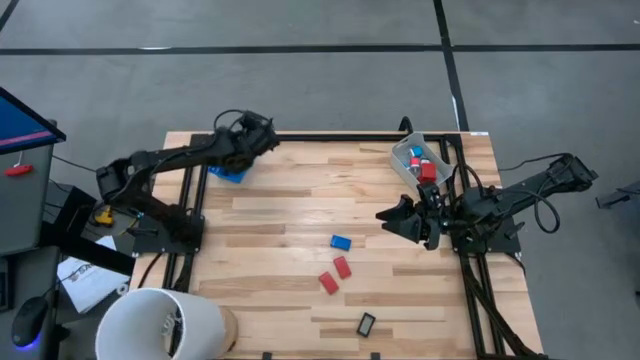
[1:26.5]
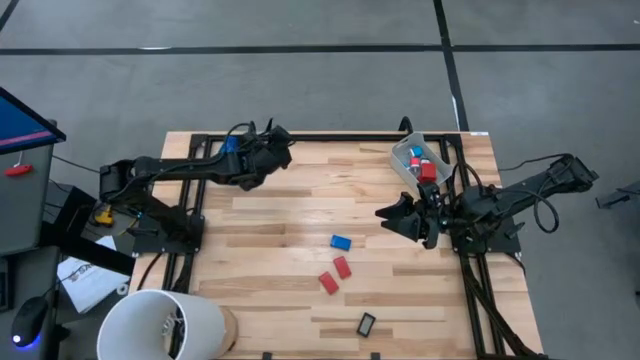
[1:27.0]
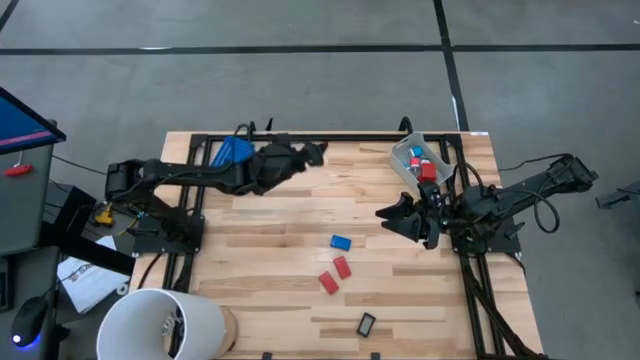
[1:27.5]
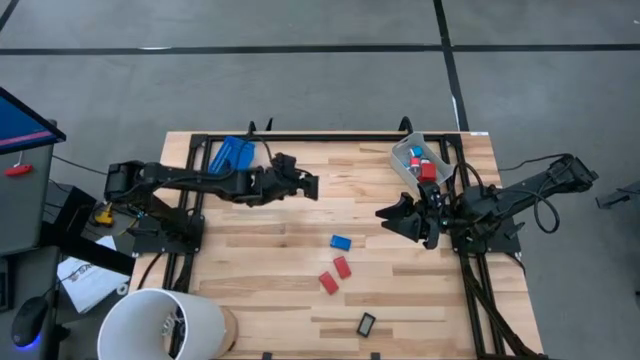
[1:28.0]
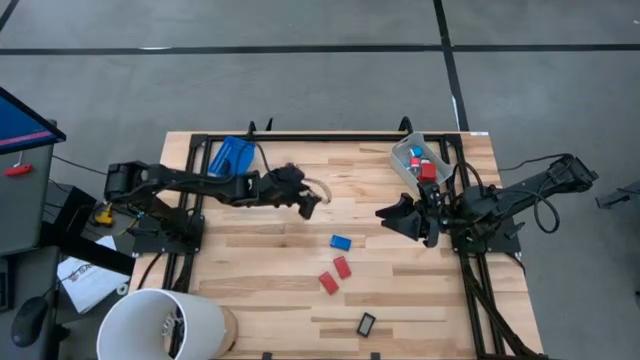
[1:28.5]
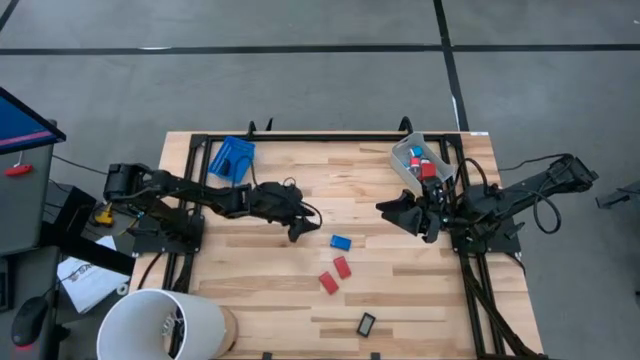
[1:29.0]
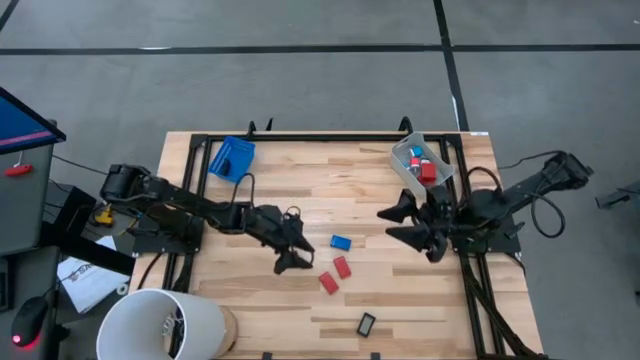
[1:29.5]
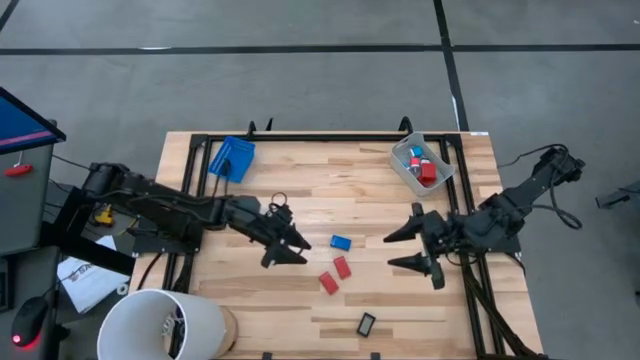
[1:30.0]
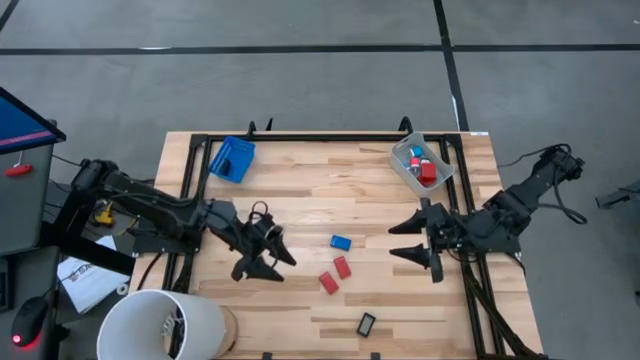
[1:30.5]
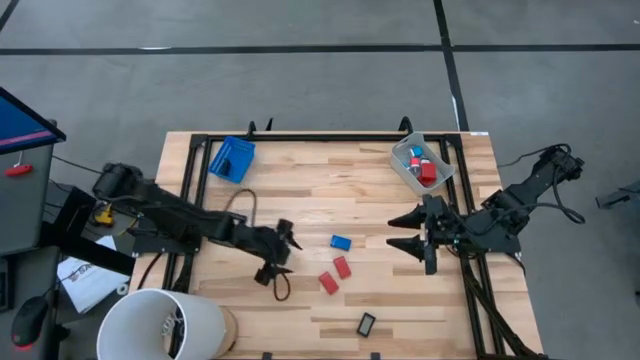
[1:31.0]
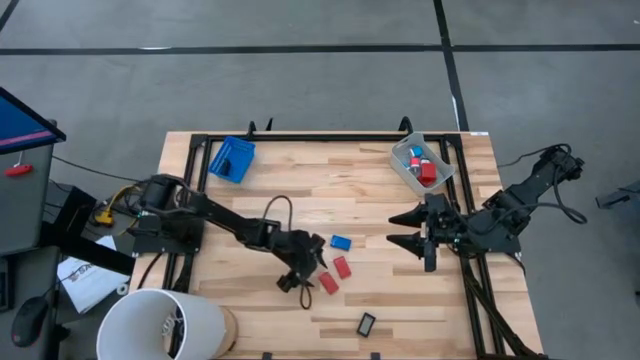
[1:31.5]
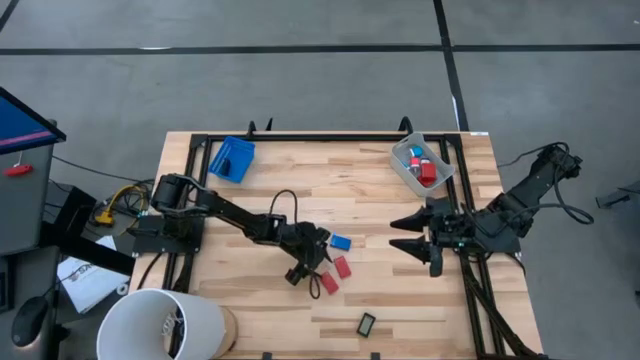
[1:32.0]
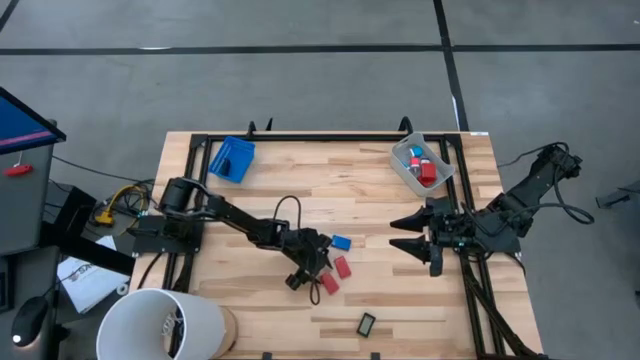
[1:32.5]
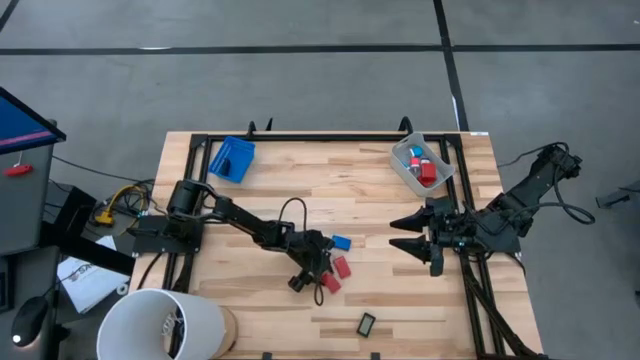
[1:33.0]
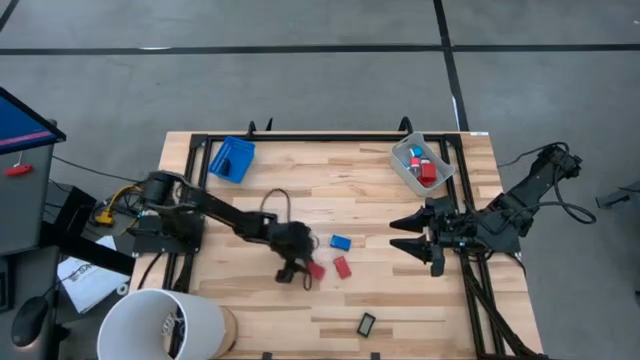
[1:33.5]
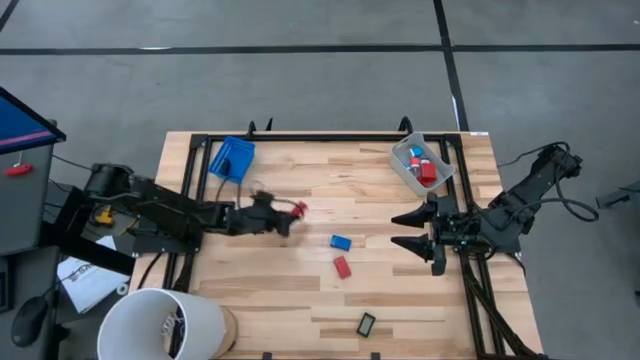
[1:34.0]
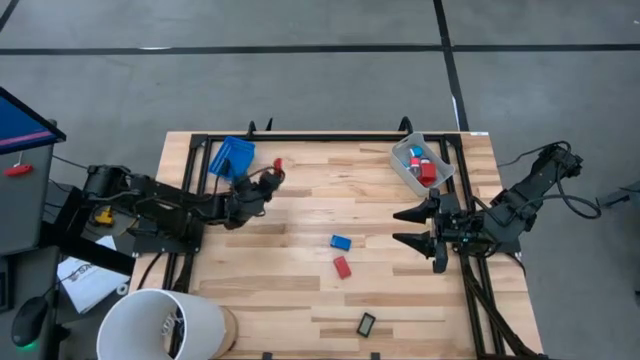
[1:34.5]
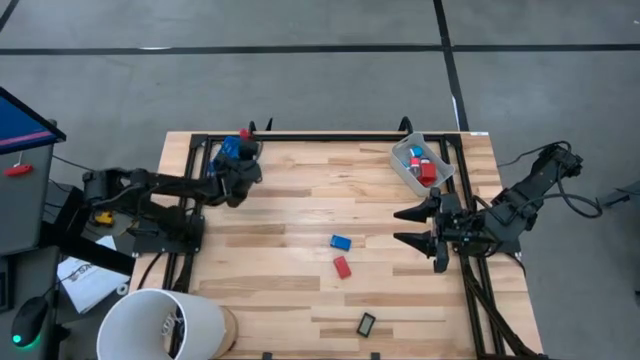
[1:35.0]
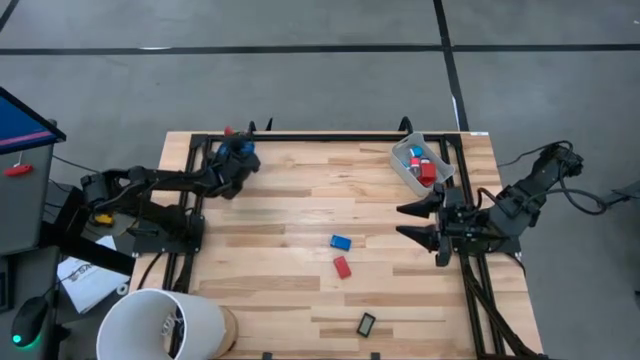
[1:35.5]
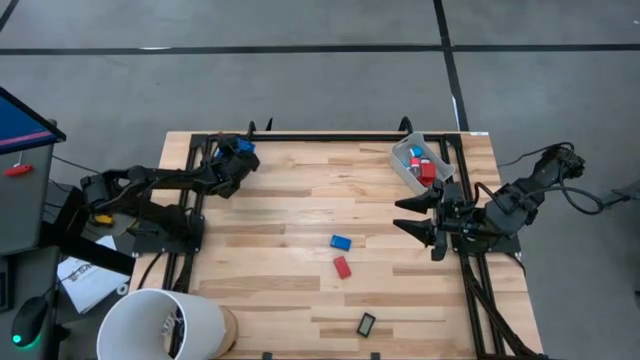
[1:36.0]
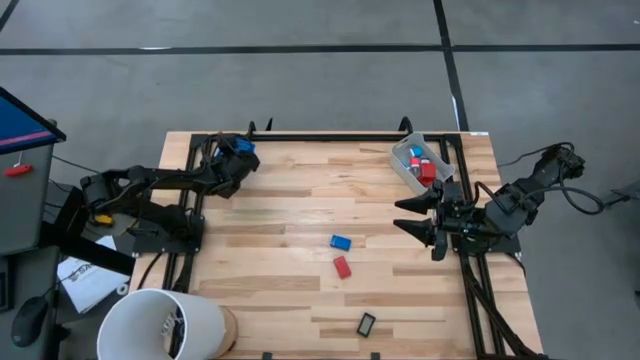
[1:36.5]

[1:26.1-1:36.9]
Task: Pick & Place Office items
Put the left red clock into the blue bin

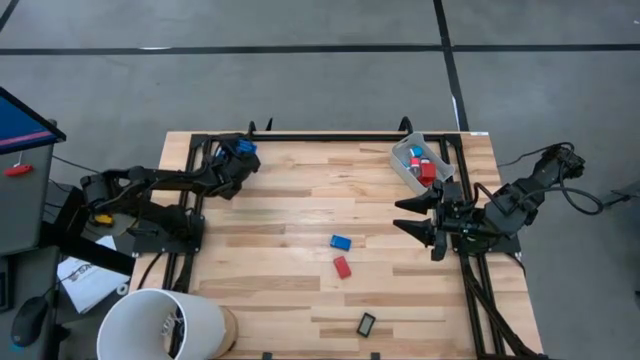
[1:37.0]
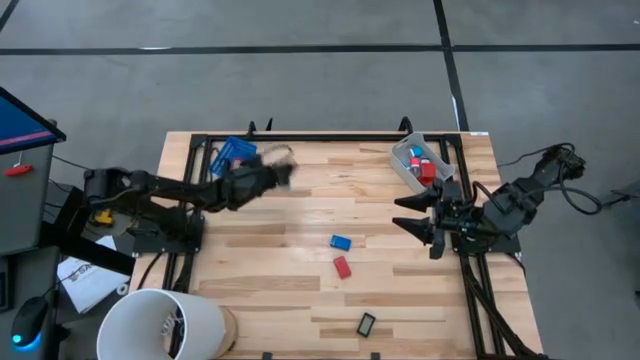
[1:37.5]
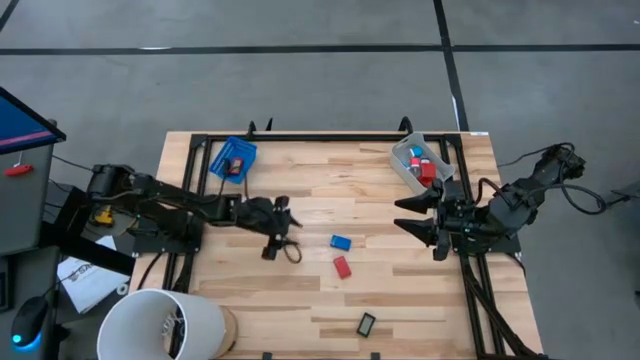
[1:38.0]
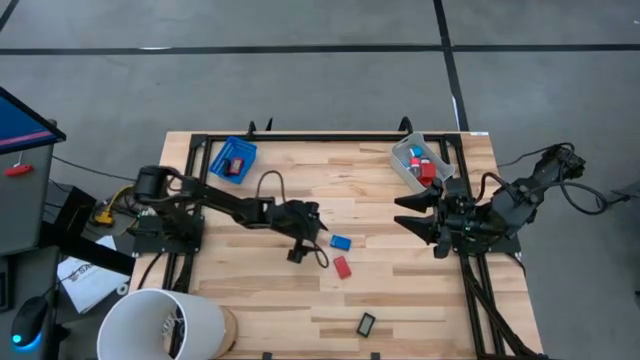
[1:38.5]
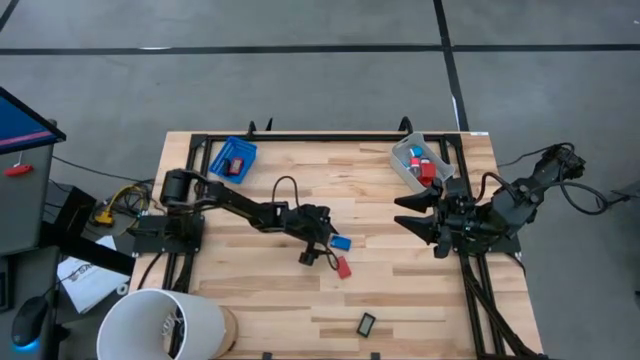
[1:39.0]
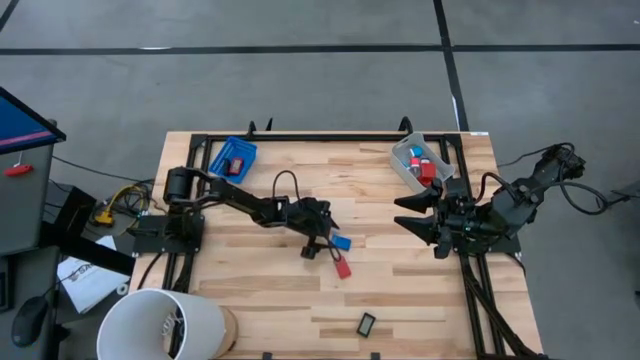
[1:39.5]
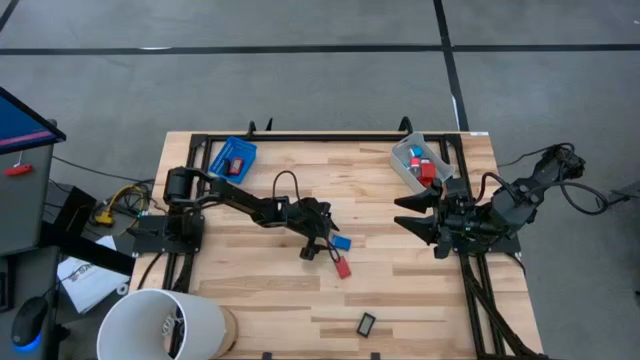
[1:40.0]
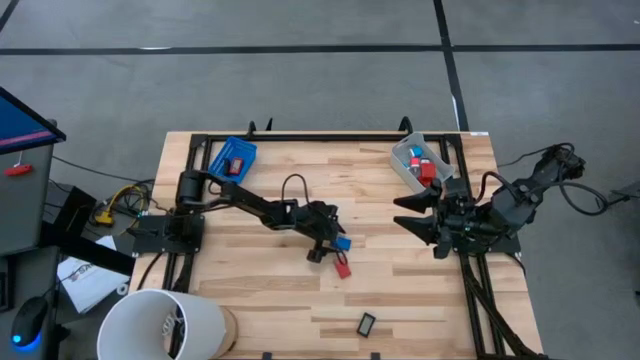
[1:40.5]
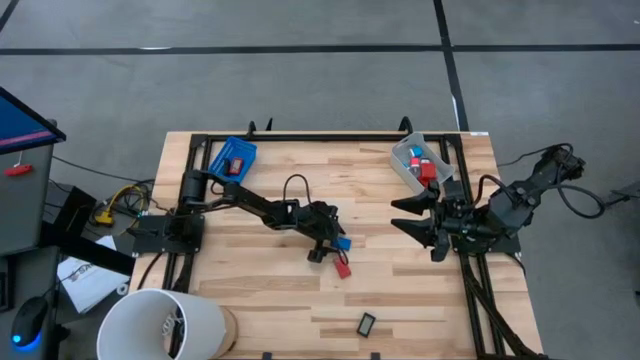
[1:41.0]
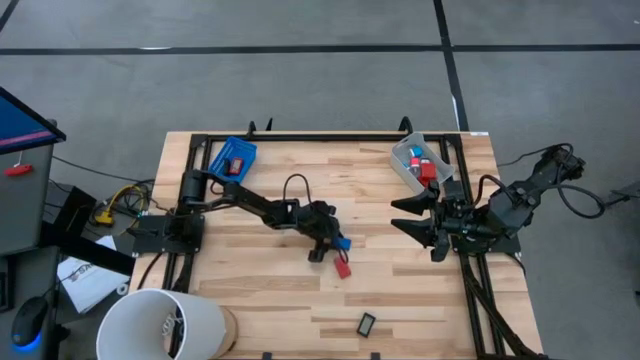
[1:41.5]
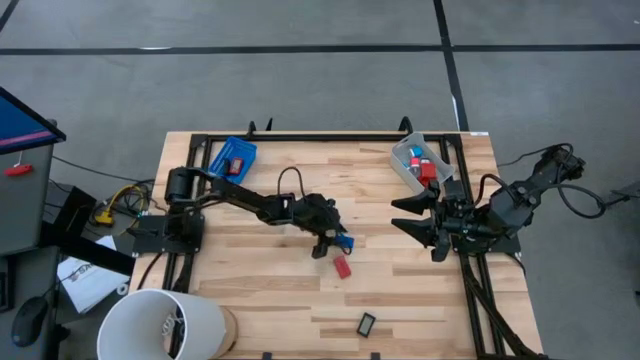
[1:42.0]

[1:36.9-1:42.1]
Put the blue clock into the blue bin

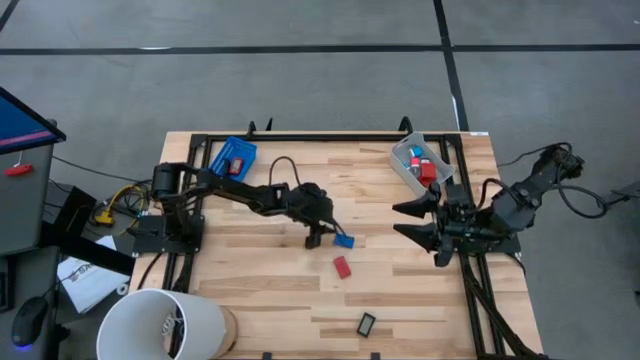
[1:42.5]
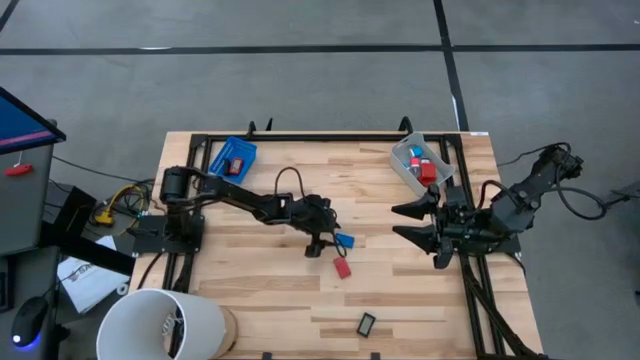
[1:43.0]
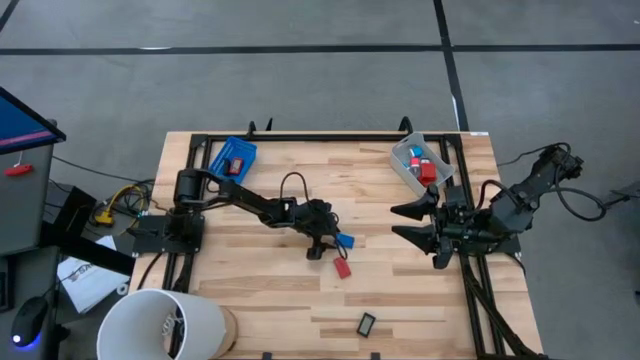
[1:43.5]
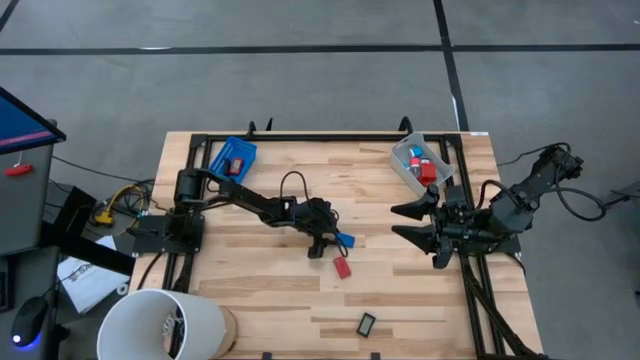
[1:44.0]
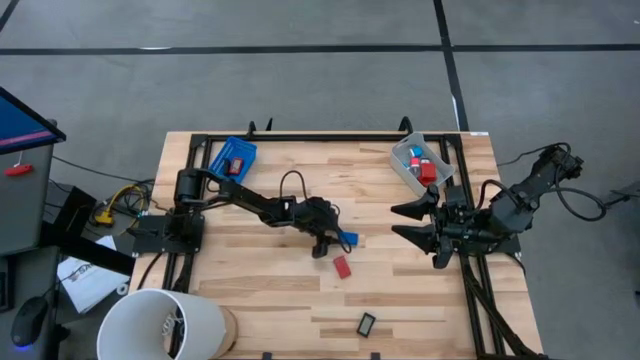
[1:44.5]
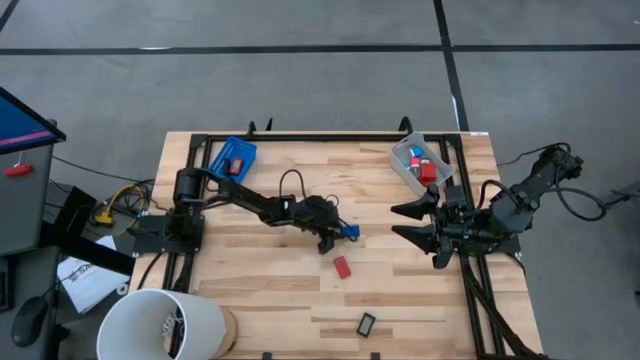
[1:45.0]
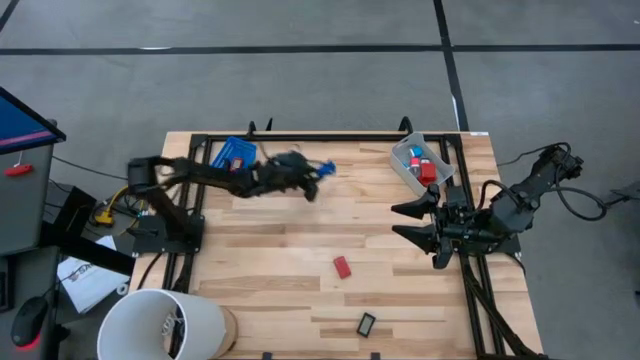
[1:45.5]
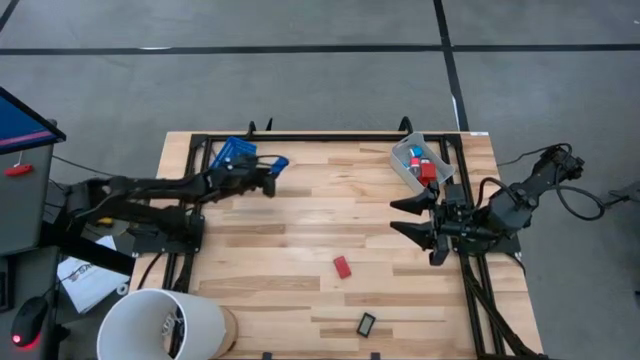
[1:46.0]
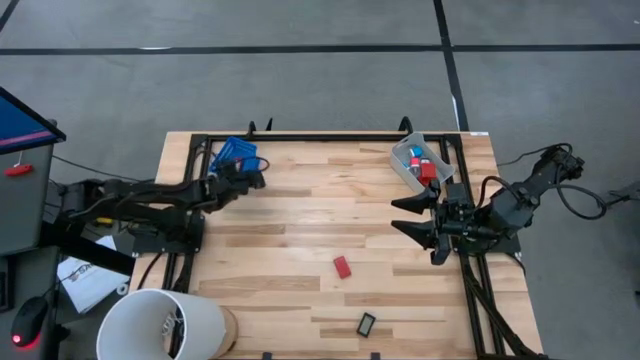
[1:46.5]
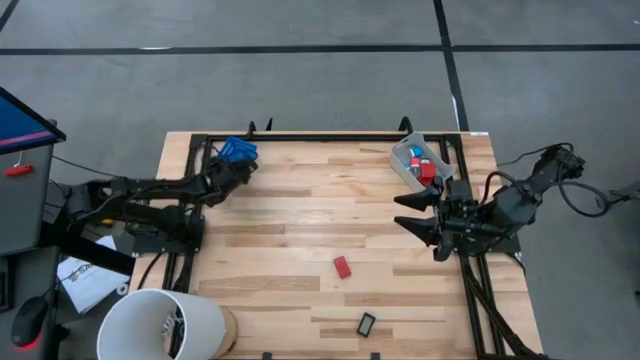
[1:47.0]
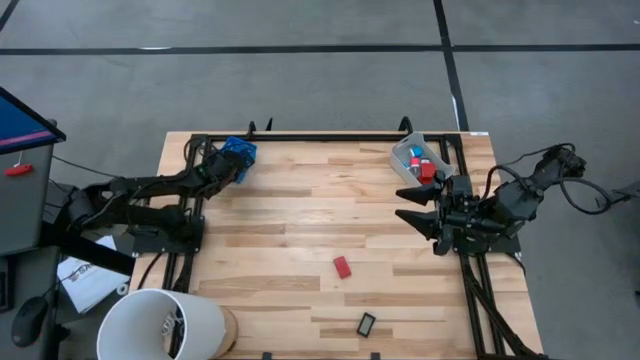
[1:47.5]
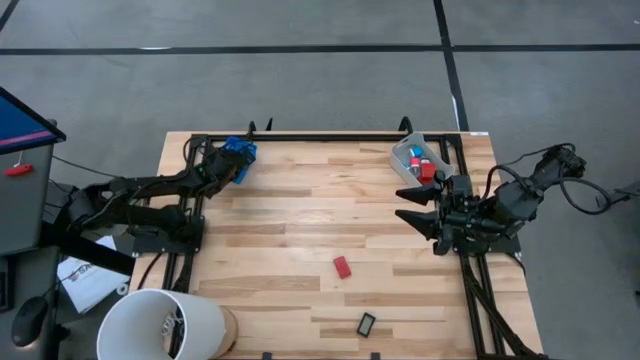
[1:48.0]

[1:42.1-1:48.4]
Put the blue clock into the blue bin
